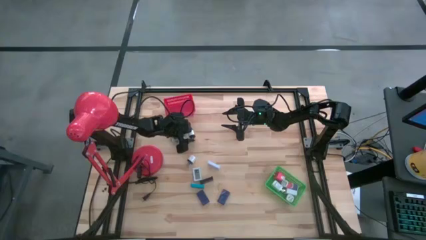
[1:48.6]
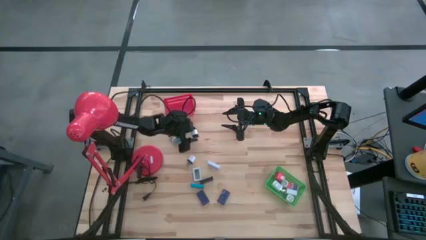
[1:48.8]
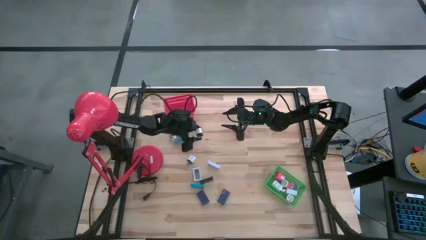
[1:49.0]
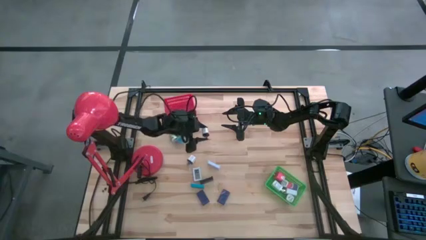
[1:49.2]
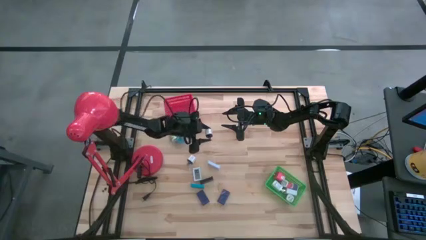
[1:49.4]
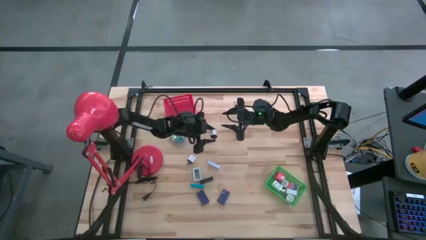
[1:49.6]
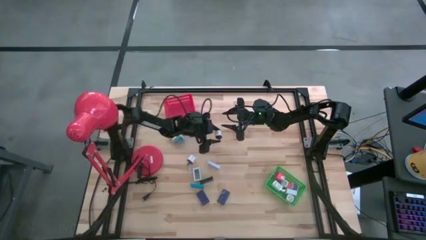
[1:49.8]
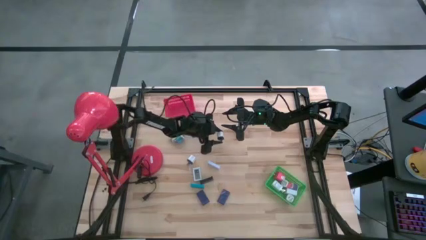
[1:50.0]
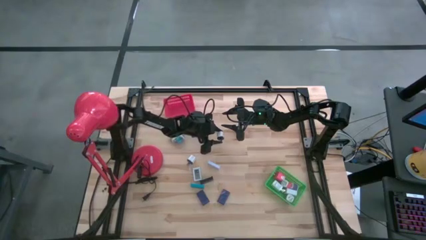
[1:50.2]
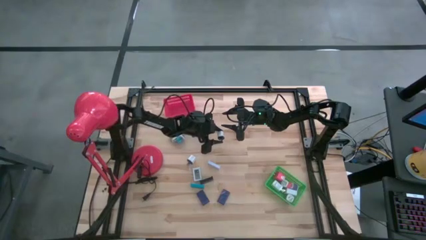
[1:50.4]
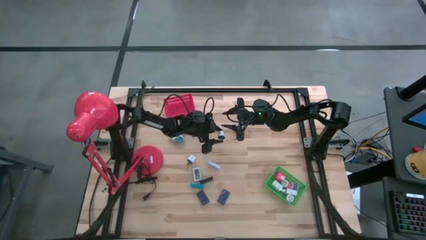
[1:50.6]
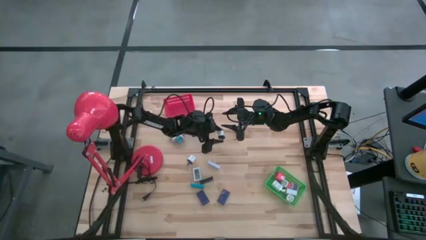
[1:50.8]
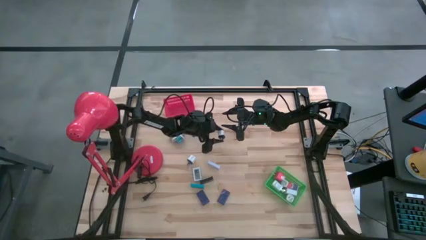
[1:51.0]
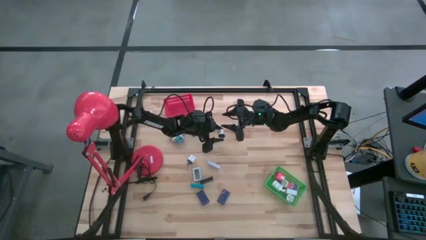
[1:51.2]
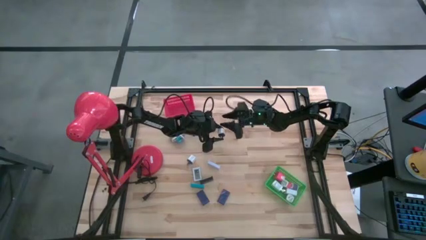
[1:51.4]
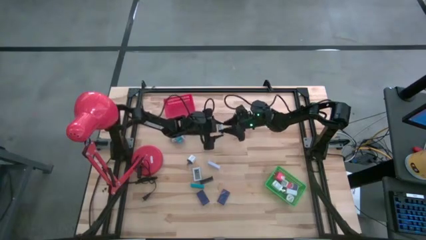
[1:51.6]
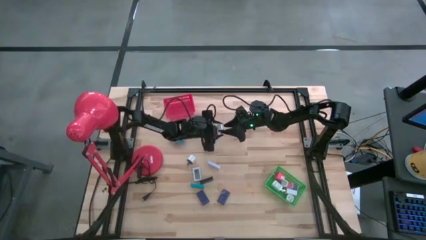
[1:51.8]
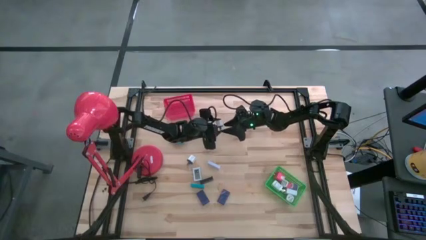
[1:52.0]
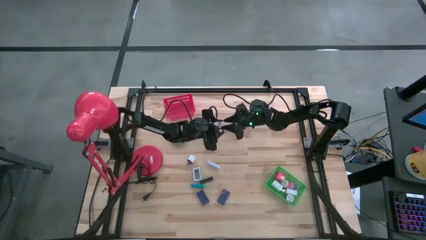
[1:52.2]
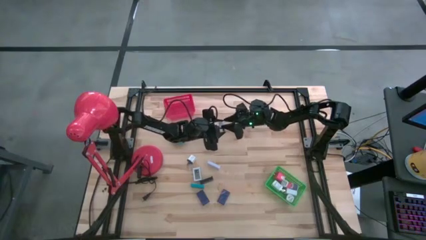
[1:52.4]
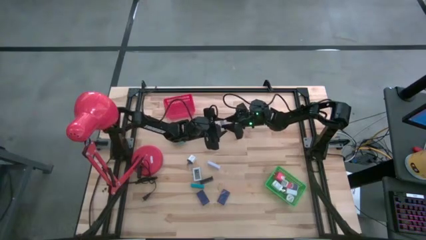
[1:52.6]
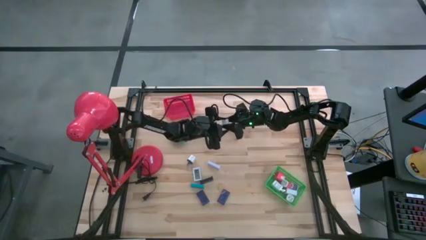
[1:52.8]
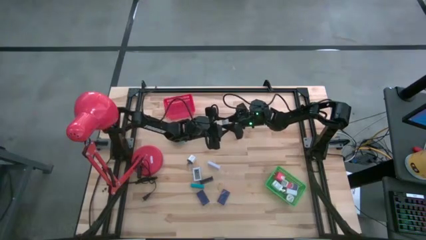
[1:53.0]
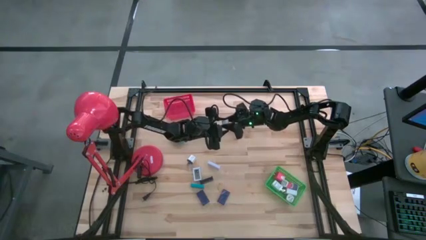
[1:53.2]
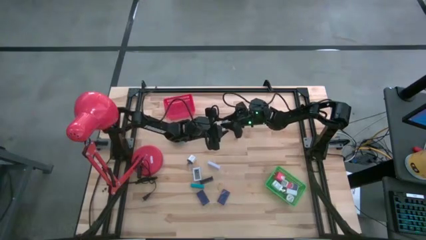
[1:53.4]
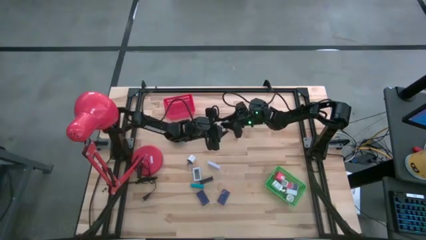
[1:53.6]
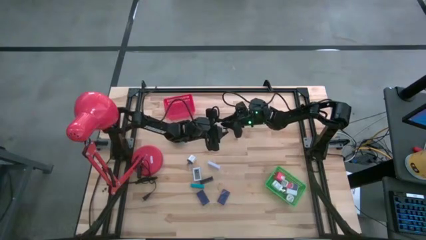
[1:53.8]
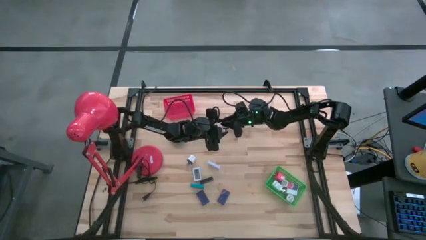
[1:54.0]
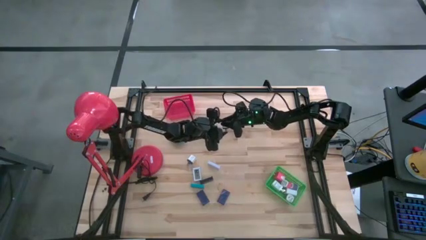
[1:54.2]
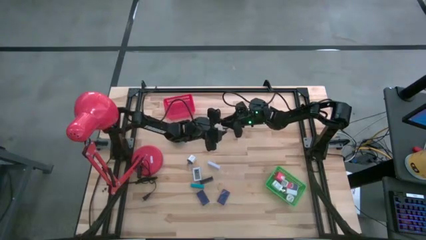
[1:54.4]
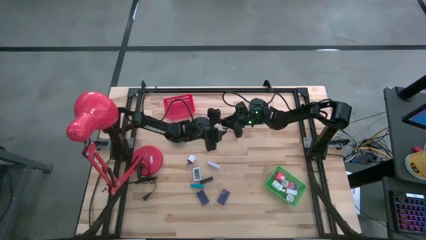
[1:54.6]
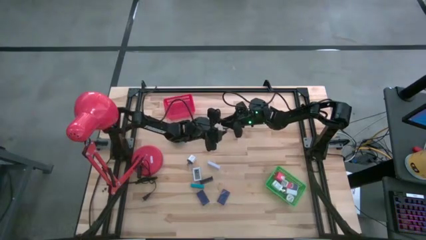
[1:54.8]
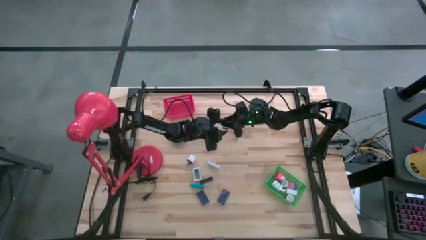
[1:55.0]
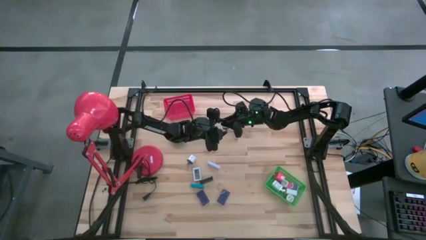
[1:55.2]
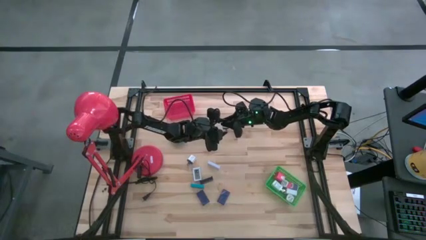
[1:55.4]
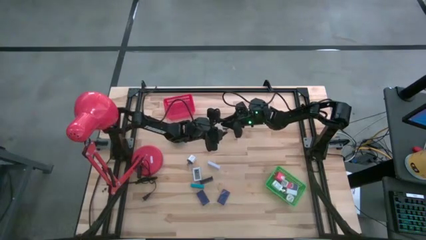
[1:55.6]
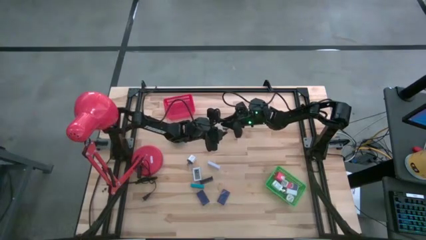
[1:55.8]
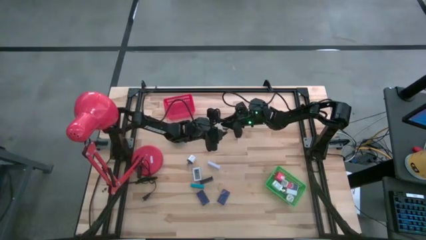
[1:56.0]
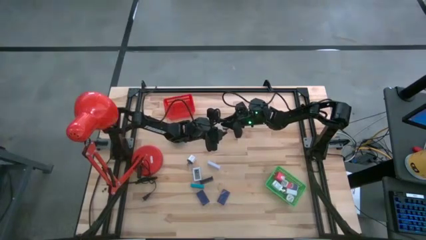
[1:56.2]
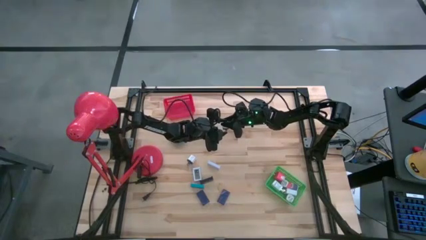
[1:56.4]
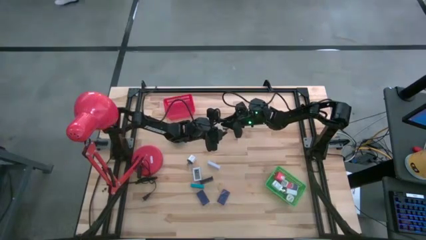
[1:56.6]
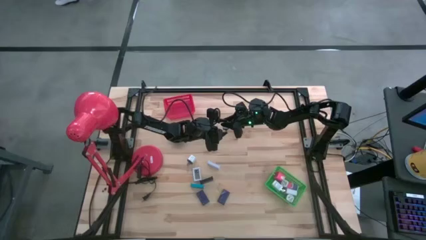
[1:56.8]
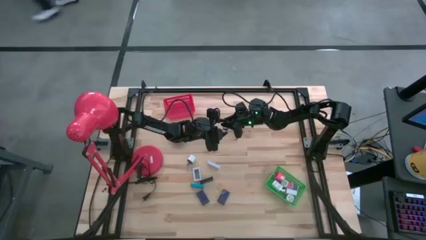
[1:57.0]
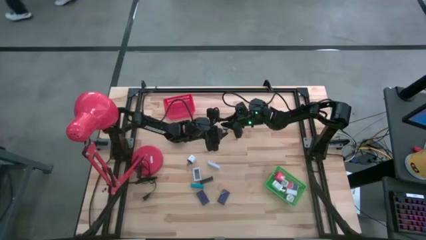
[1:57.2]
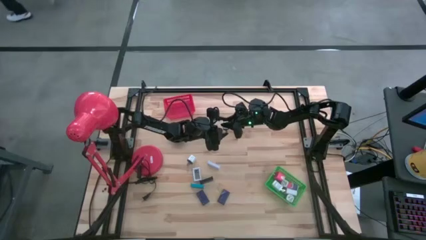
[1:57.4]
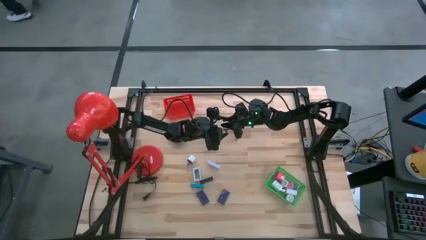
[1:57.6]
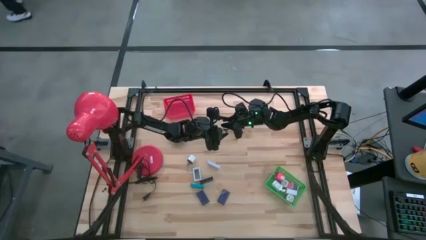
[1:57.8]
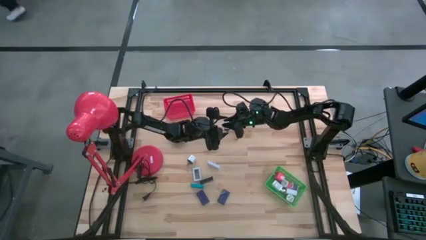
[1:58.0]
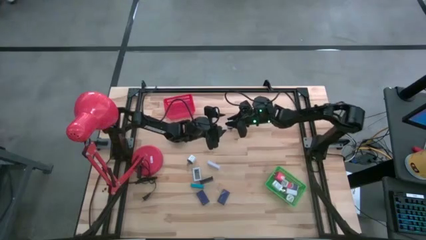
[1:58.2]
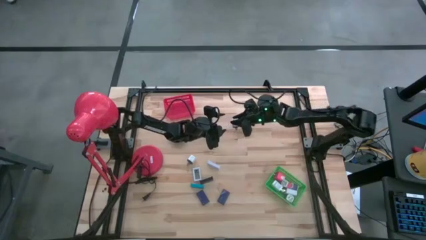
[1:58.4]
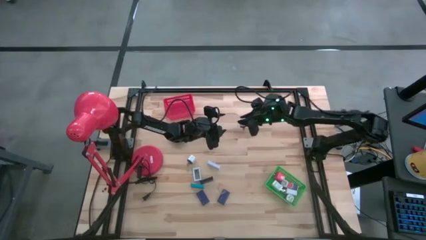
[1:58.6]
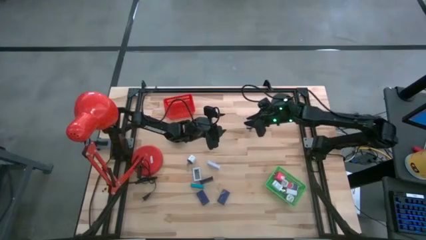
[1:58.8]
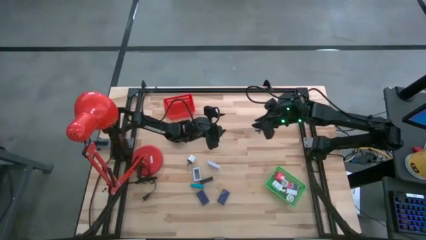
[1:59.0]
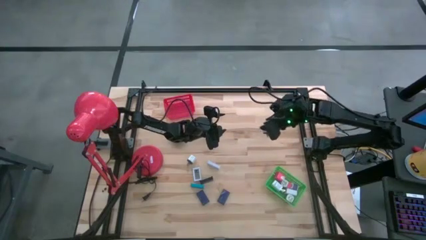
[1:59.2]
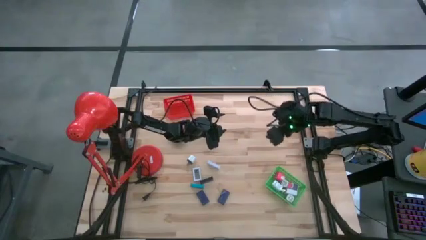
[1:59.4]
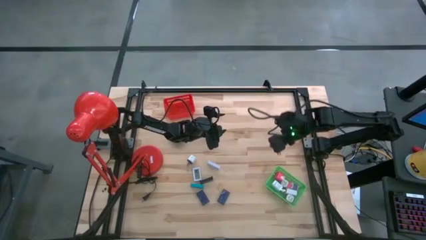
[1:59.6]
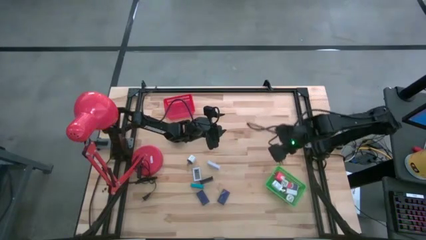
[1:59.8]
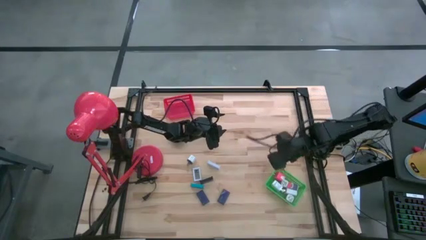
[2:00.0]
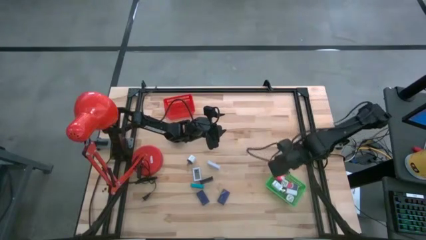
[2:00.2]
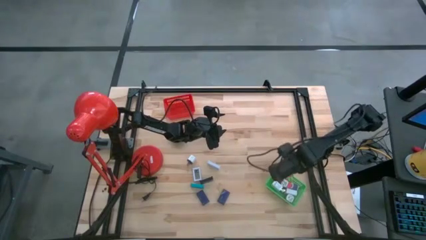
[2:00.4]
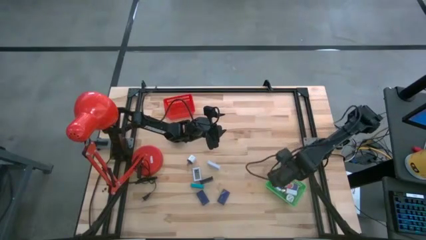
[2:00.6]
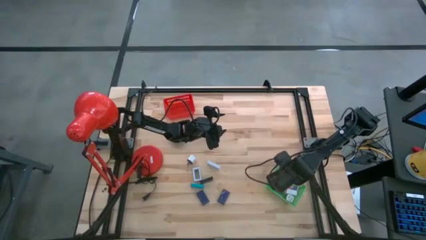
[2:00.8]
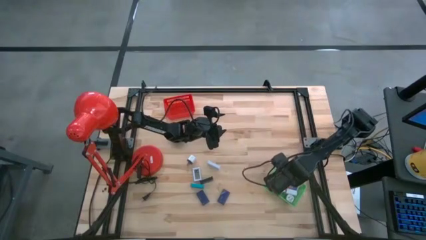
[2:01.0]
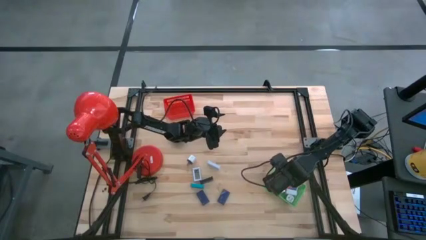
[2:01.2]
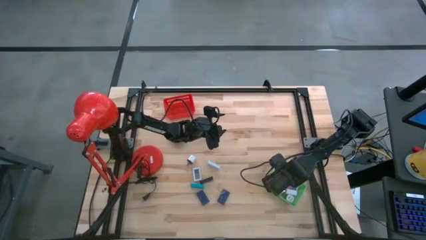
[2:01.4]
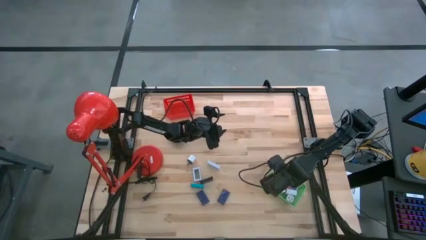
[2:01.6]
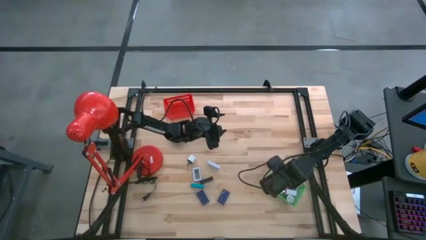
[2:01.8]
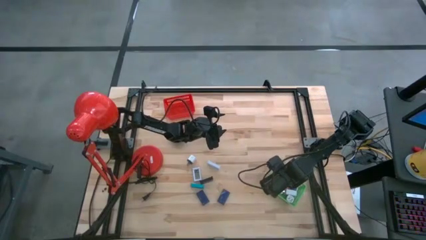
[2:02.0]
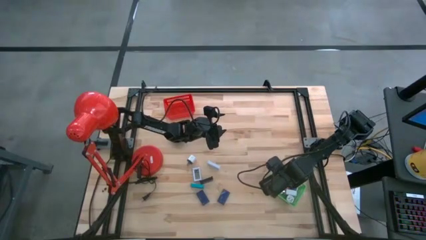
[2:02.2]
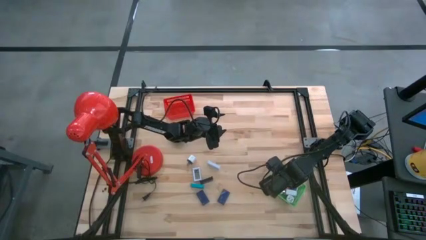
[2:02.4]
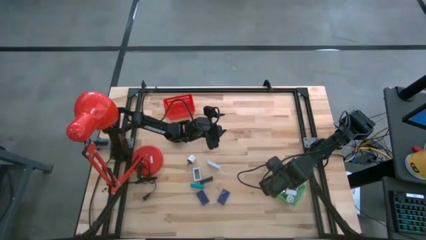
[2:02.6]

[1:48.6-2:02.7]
Task: Pick & Place Office items
Put the top white black charger adapter into the green bin

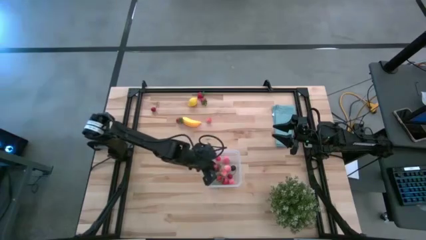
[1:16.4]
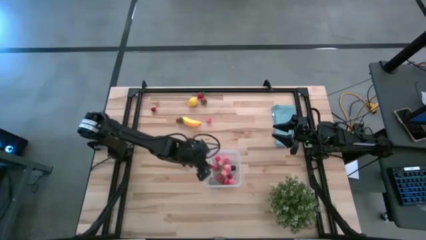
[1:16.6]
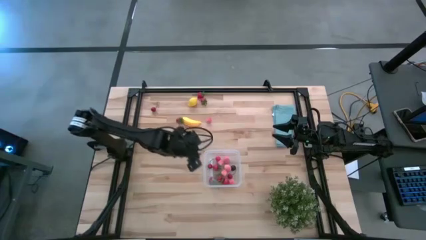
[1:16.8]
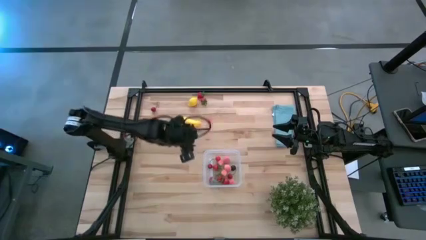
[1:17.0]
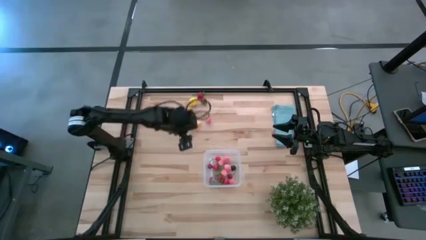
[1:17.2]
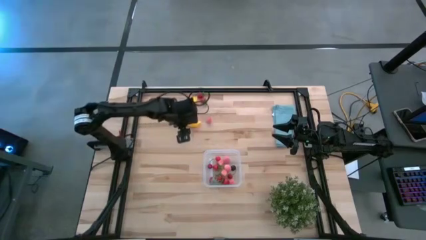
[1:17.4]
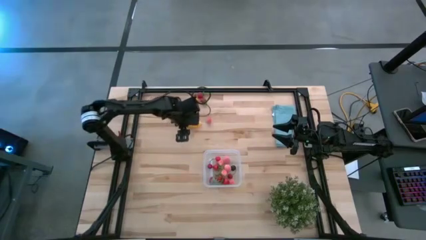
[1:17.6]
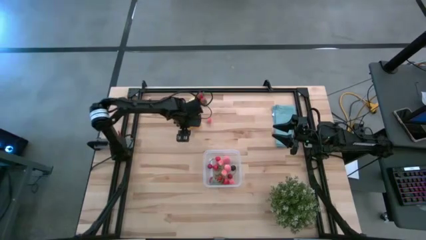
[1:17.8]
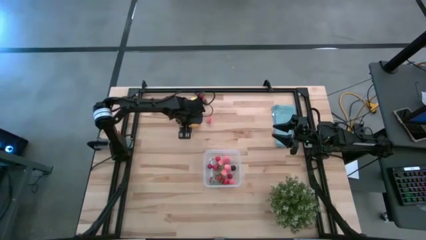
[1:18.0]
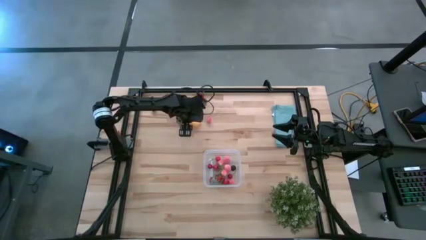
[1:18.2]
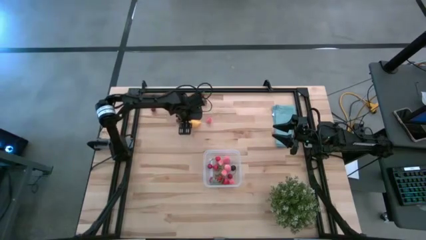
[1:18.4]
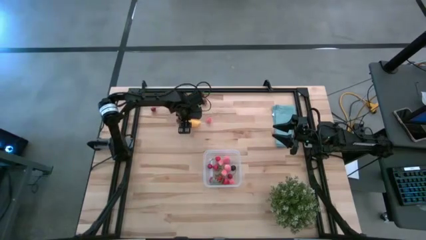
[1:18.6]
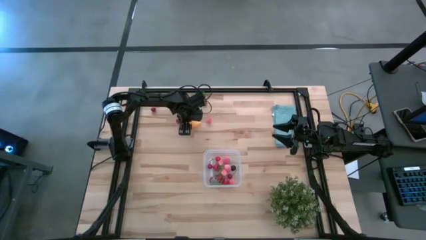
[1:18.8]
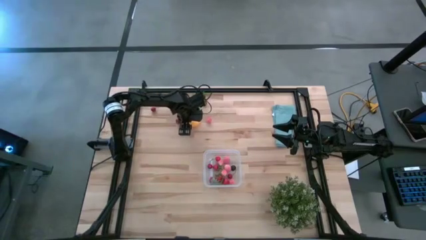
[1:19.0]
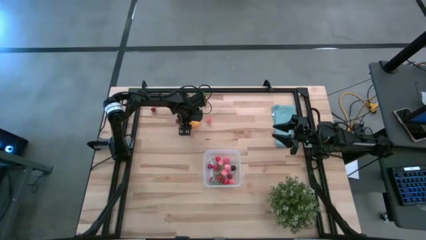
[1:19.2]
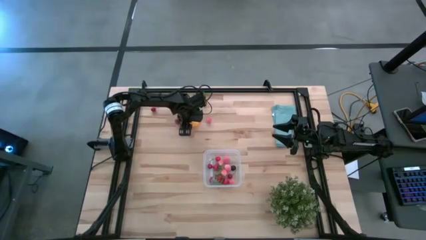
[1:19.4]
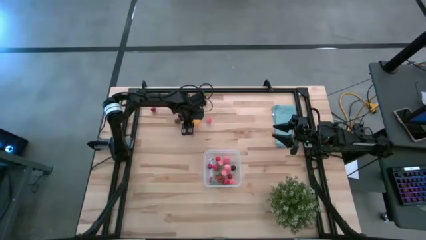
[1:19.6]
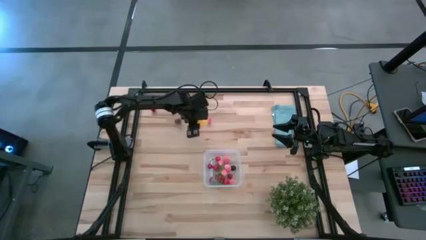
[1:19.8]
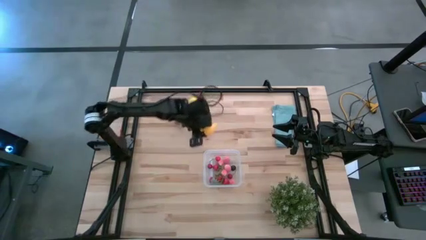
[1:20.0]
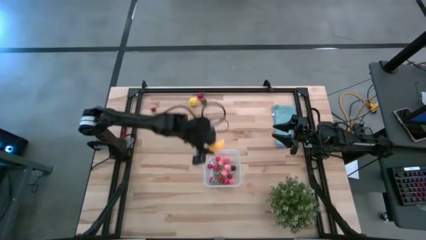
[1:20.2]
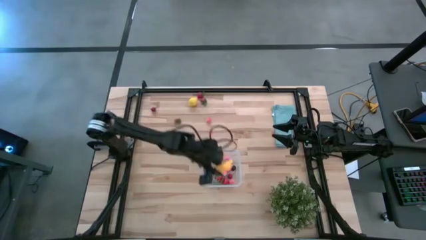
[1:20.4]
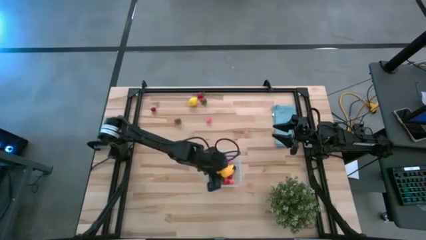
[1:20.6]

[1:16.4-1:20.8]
Task: Pick and placing Produce into tupperware
Put the yellow banana into the transparent bin
